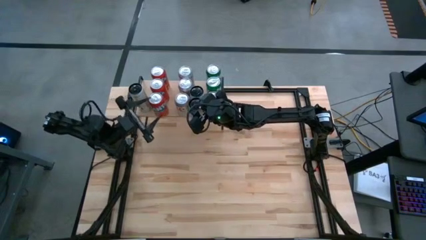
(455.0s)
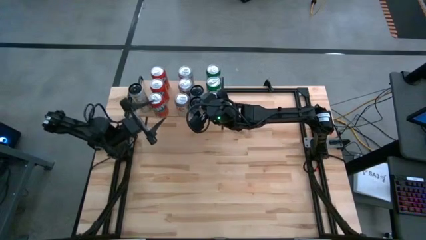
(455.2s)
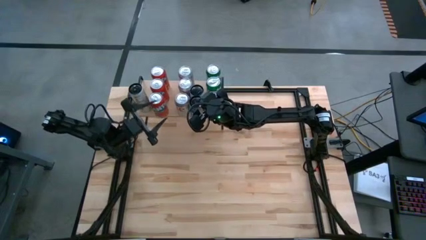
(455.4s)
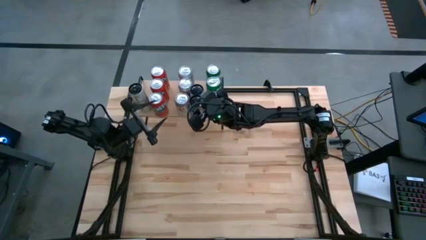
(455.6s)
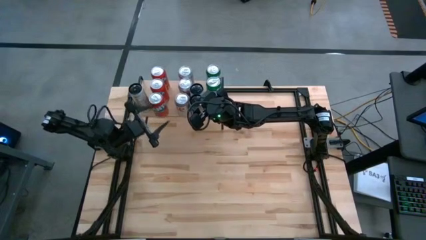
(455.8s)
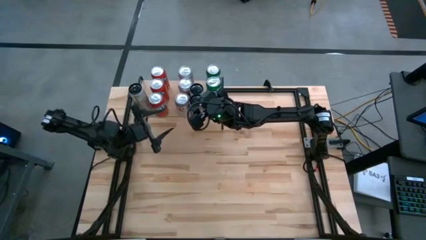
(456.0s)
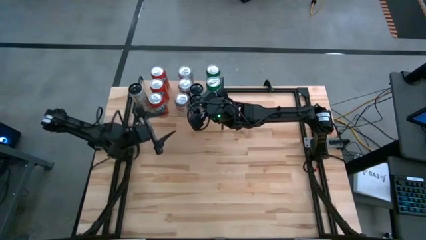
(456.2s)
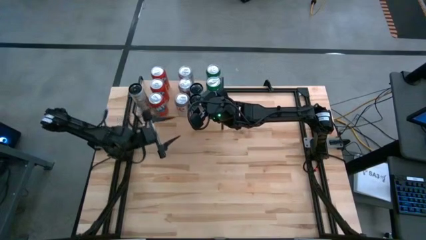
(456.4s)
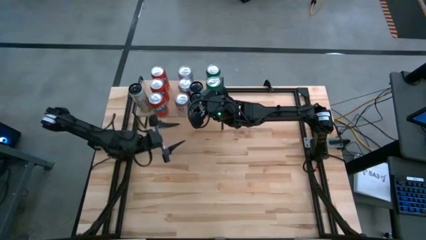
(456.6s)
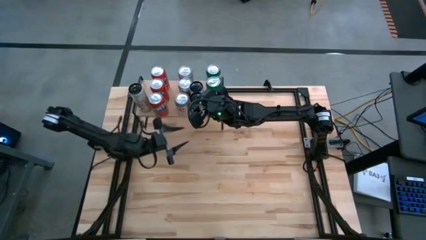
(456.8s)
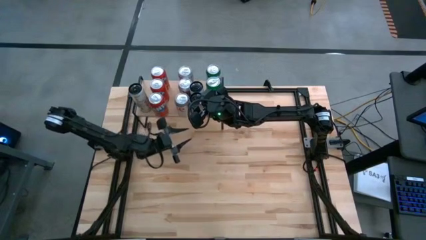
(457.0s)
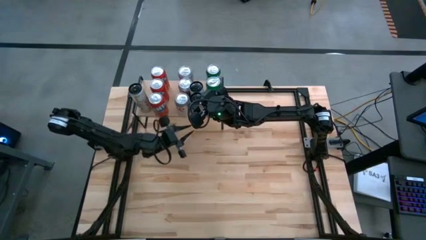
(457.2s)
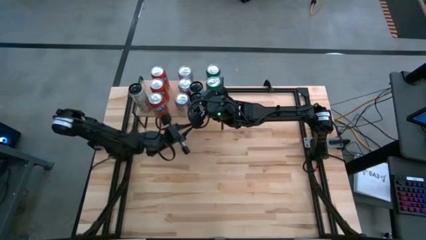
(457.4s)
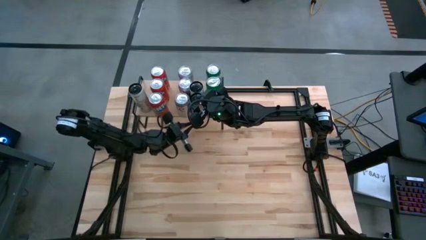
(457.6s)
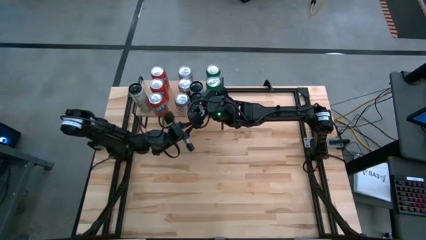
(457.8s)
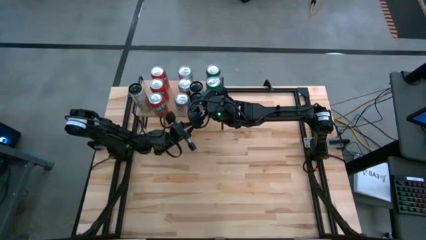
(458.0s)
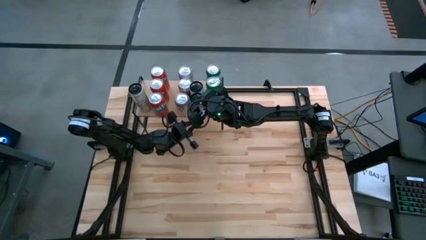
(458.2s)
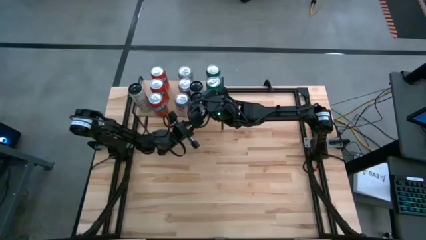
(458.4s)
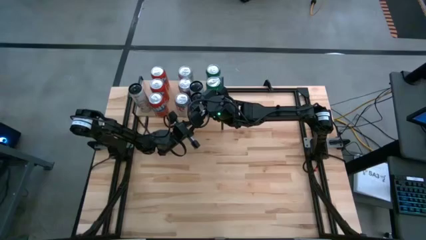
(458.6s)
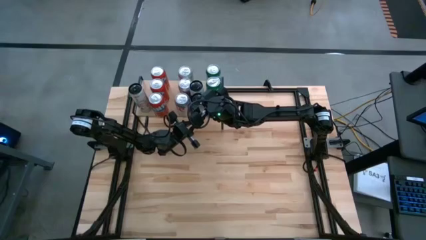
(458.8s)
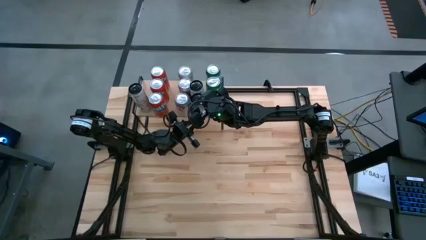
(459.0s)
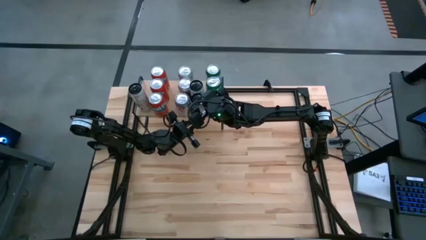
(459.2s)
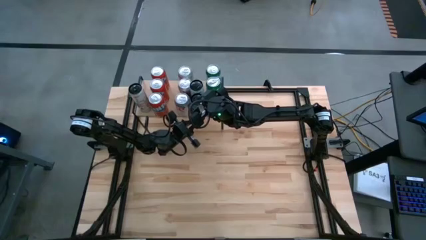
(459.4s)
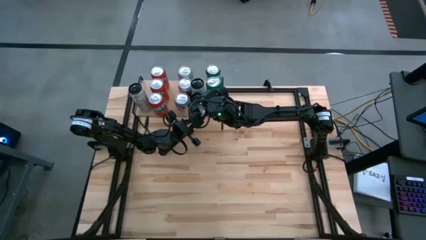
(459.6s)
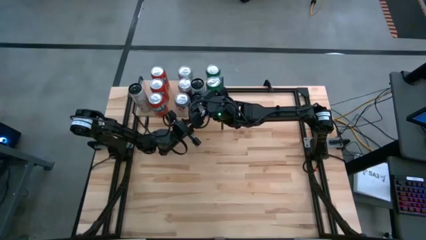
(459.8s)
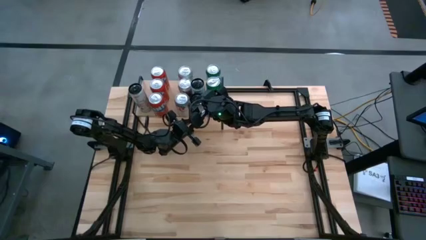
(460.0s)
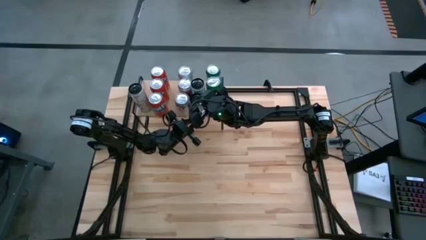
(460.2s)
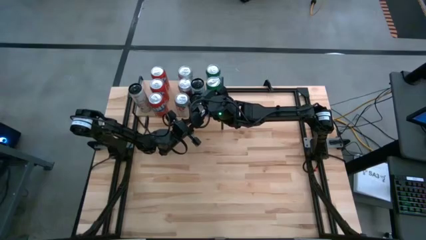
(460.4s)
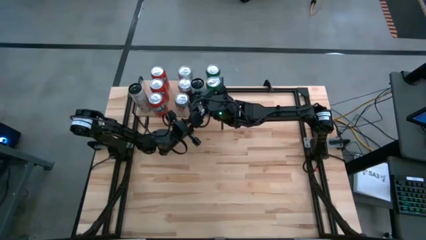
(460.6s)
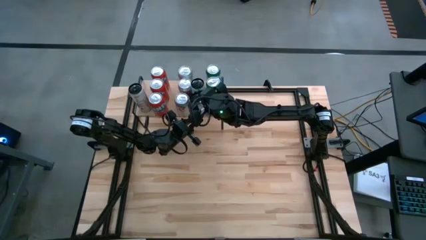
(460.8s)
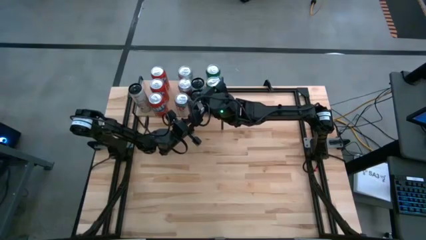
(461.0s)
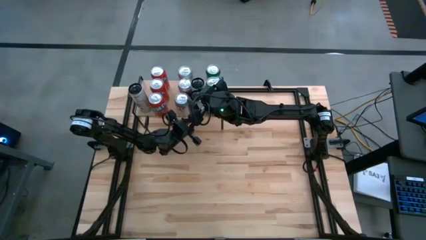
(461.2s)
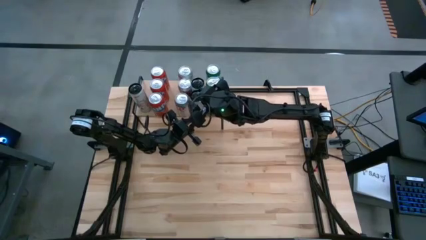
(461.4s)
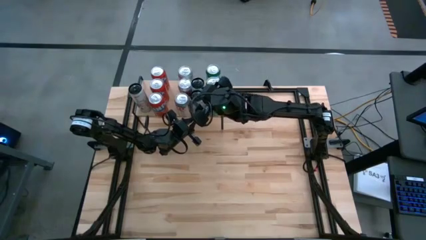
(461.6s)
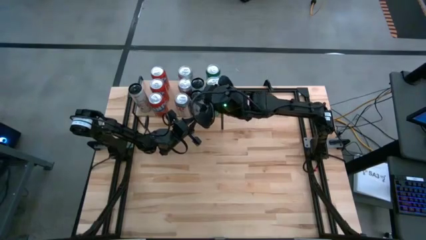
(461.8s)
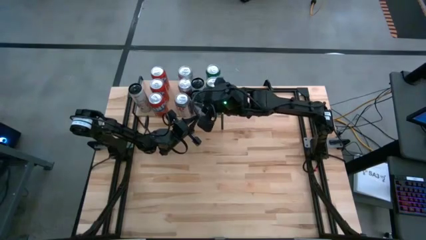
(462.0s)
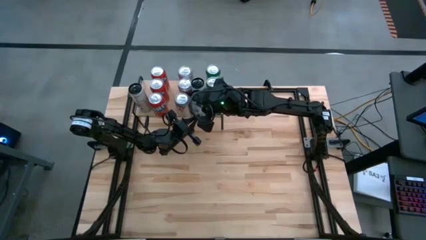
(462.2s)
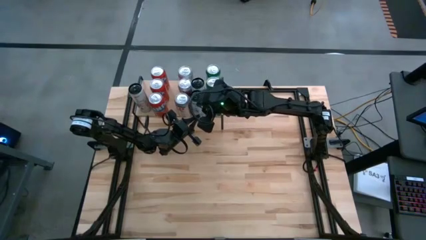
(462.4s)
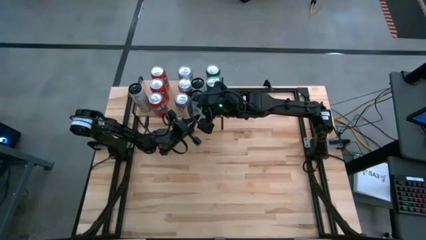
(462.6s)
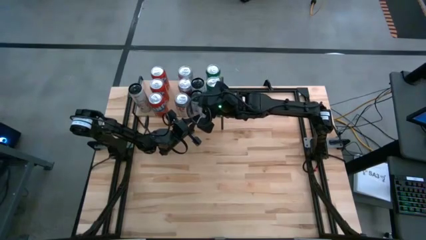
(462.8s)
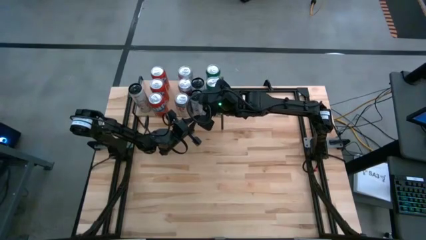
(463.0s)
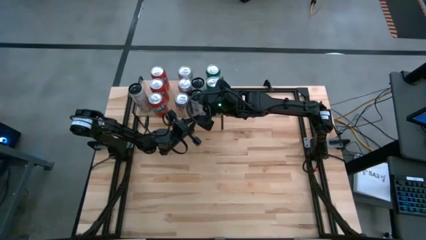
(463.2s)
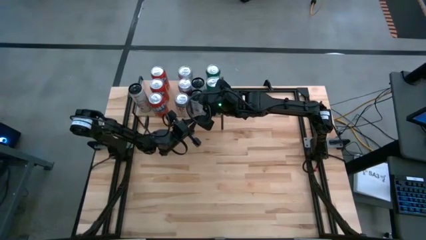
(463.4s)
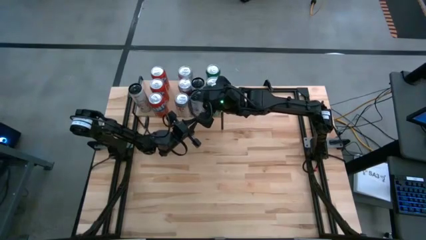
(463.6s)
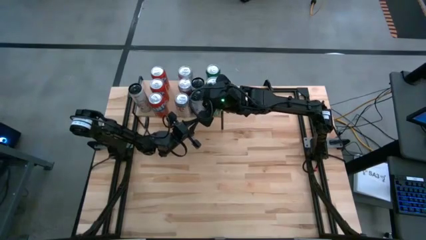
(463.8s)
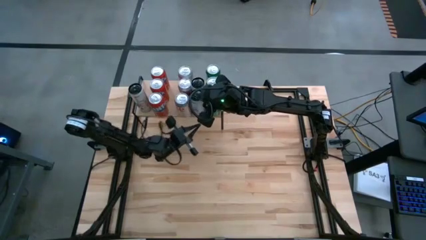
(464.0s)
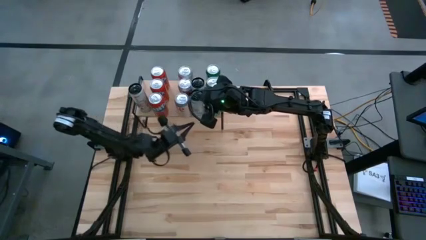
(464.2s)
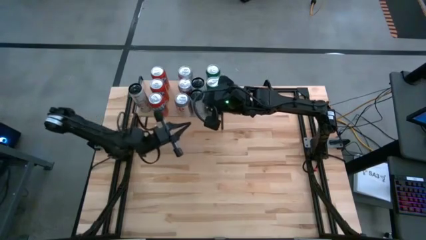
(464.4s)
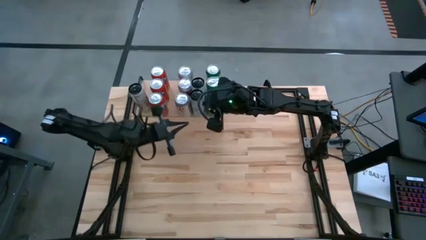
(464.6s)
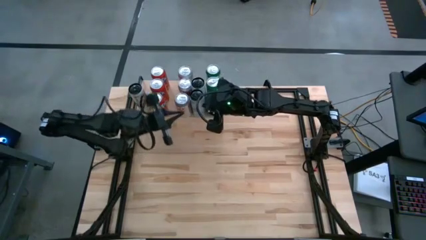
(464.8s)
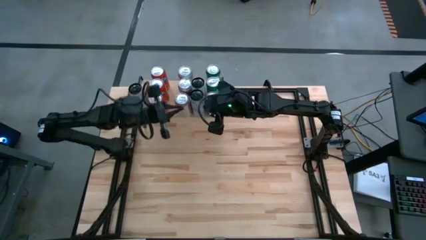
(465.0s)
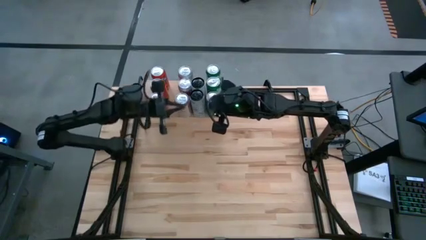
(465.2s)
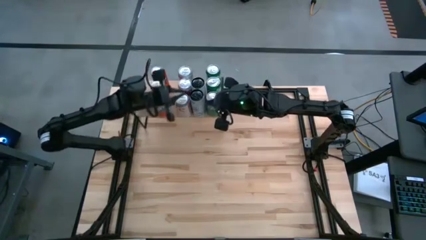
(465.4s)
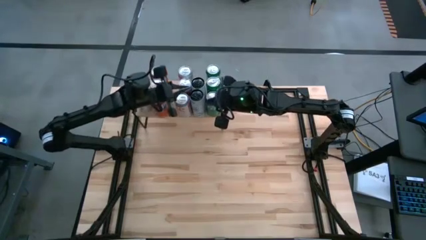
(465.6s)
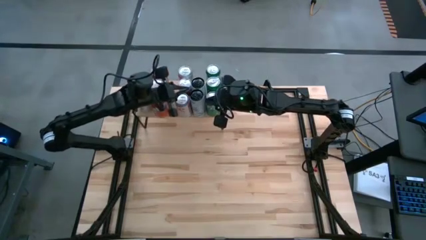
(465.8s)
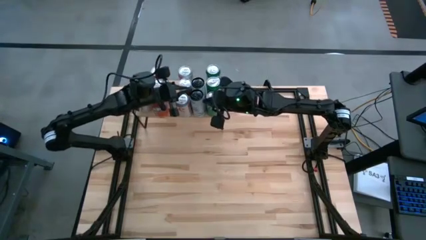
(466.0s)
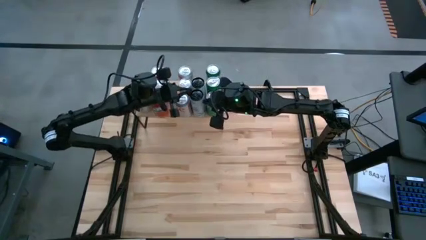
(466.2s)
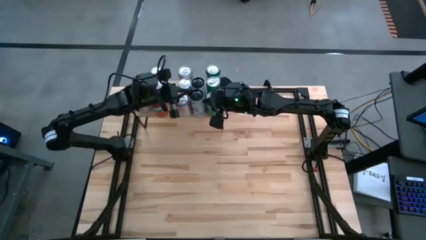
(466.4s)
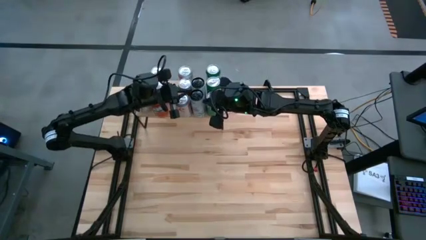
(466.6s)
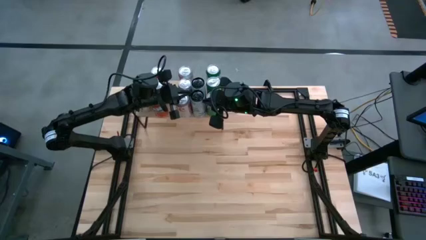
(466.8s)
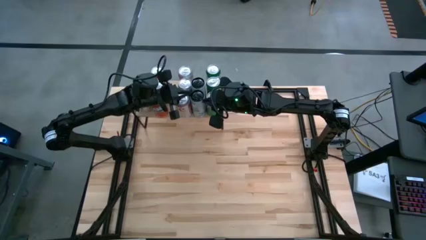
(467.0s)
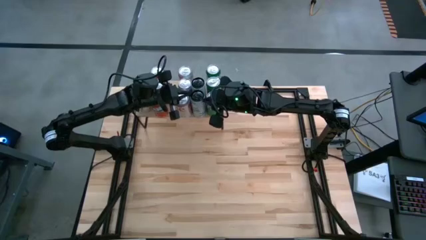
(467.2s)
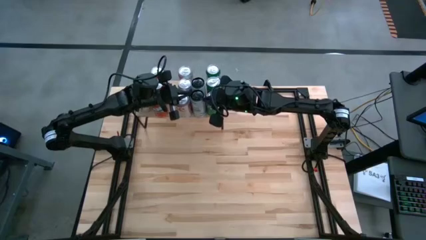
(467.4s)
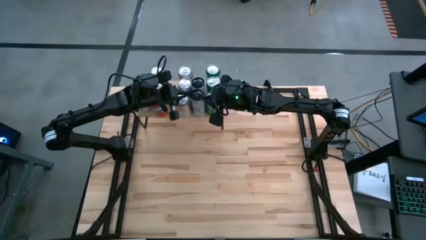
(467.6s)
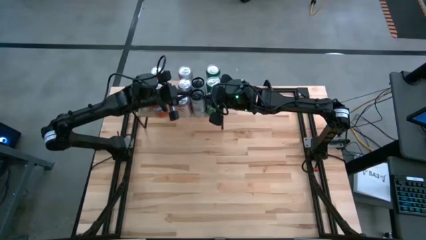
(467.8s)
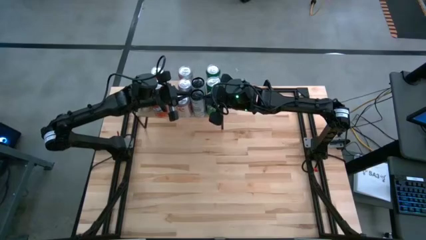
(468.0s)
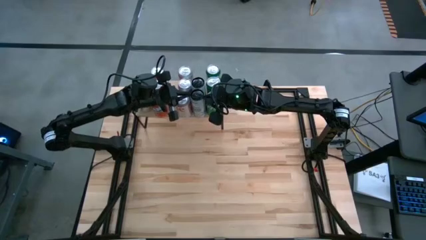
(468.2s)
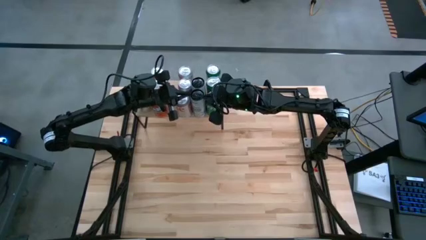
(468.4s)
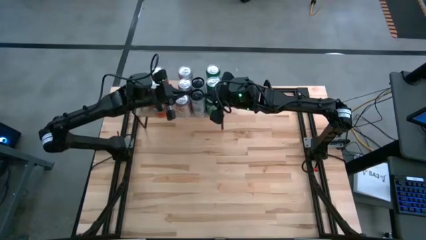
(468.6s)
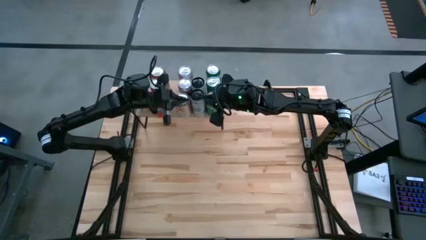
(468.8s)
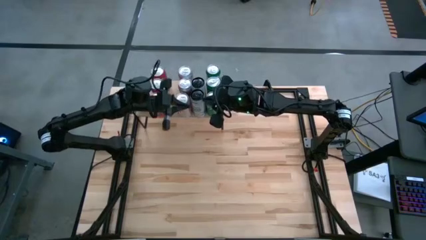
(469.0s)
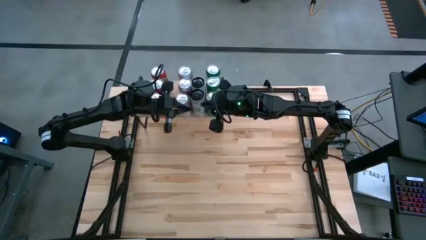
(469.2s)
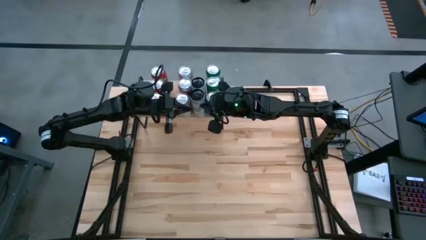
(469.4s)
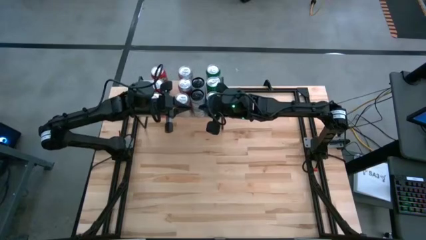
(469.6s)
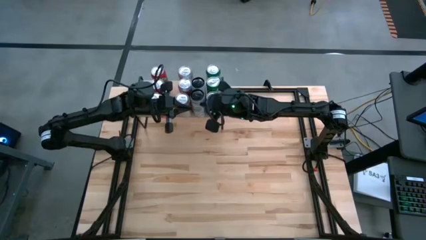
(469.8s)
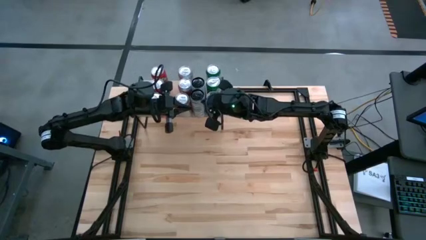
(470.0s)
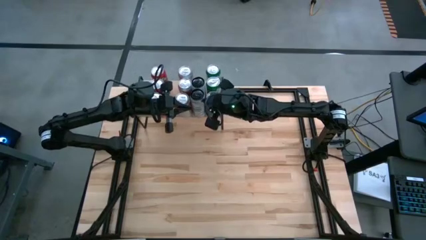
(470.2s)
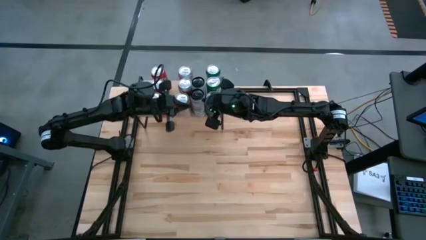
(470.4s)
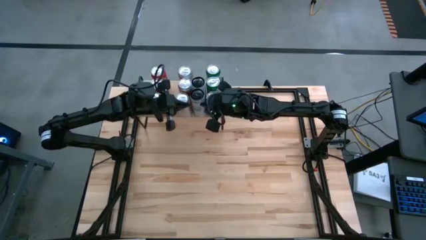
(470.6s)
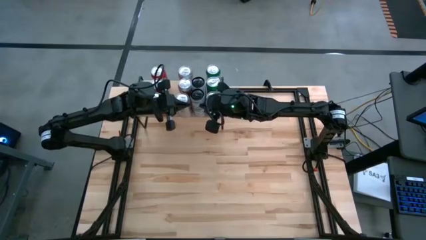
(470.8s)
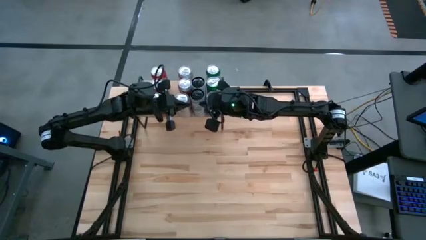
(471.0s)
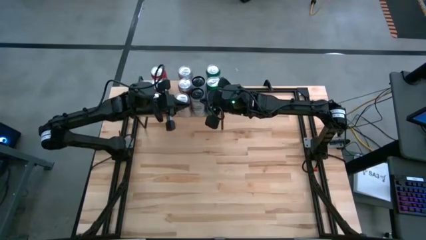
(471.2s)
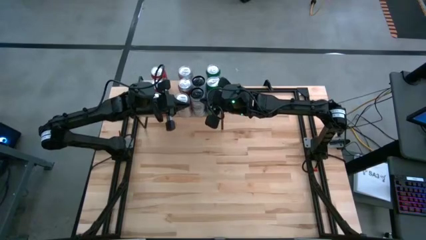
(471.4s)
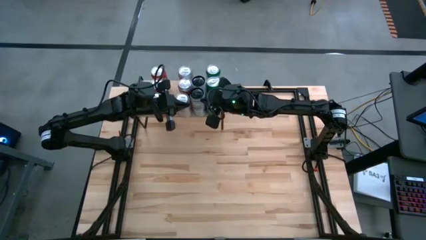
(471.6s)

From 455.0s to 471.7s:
Task: Place canned beverage on shelf
Put the white and blue soda can aligned with the other white and blue soda can on the shelf
